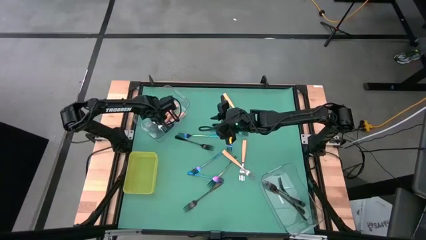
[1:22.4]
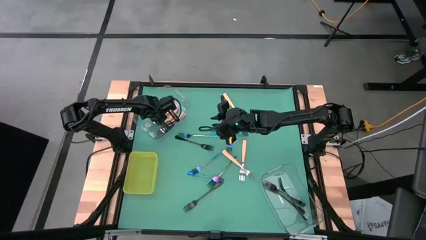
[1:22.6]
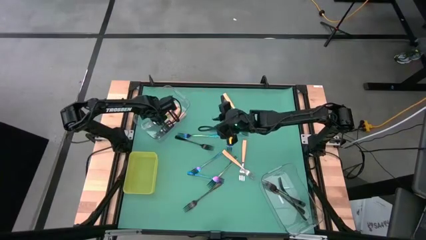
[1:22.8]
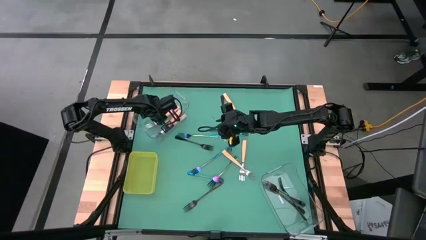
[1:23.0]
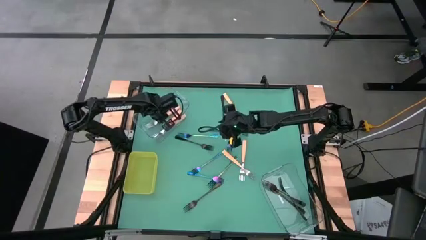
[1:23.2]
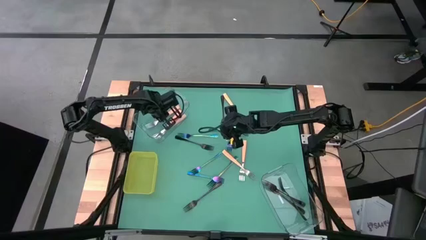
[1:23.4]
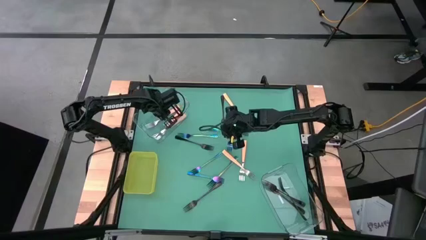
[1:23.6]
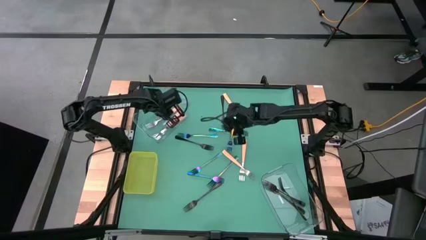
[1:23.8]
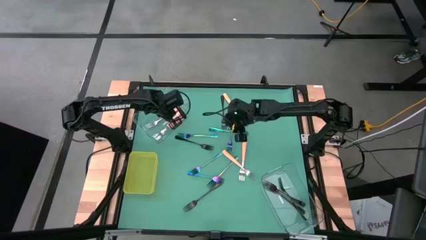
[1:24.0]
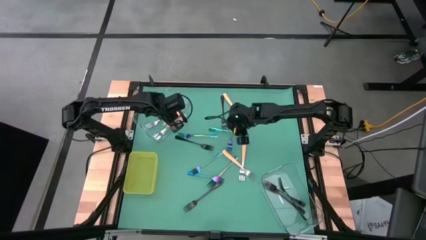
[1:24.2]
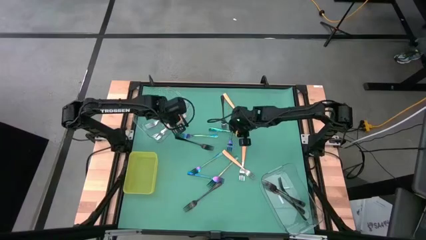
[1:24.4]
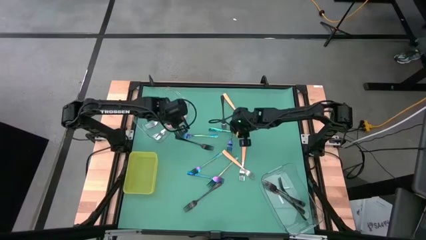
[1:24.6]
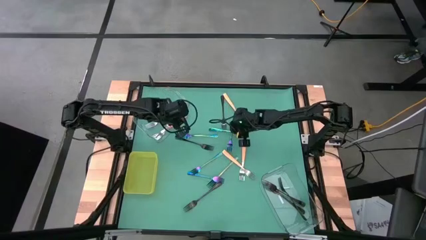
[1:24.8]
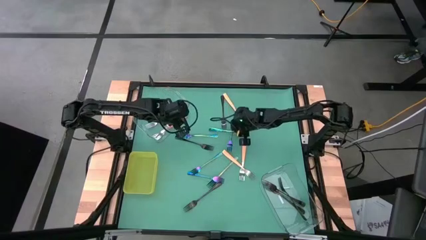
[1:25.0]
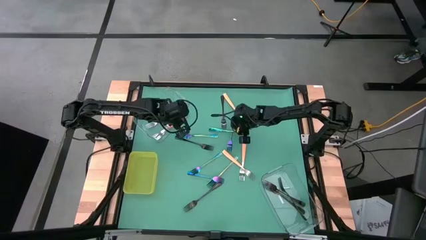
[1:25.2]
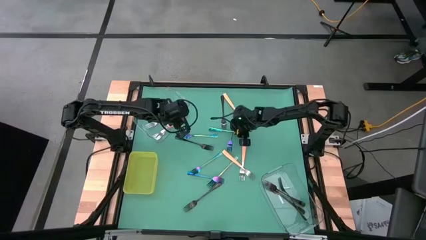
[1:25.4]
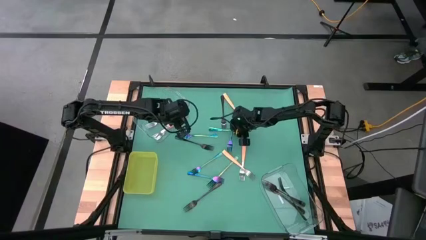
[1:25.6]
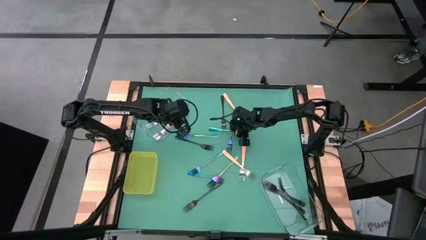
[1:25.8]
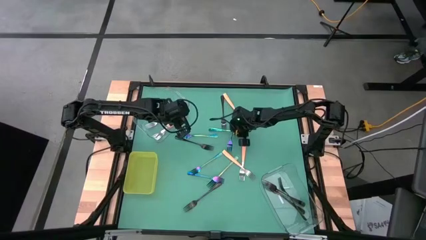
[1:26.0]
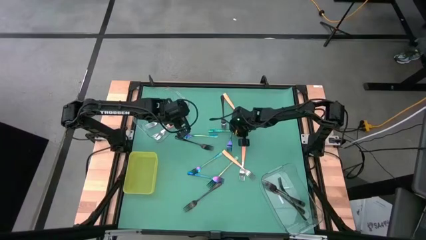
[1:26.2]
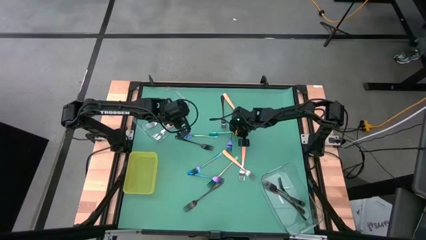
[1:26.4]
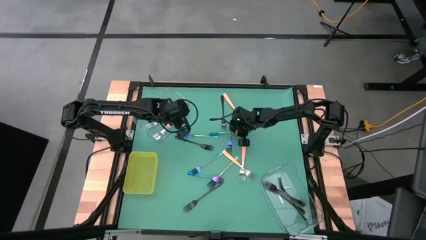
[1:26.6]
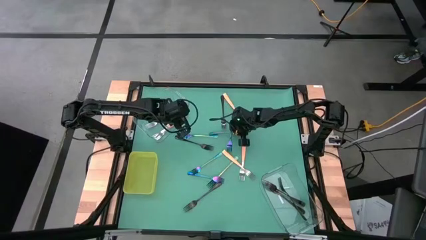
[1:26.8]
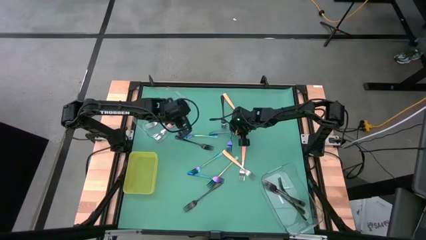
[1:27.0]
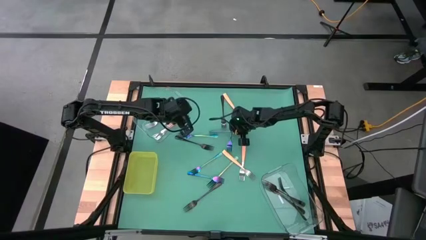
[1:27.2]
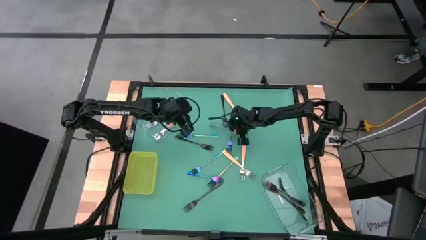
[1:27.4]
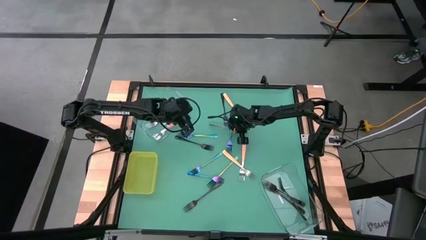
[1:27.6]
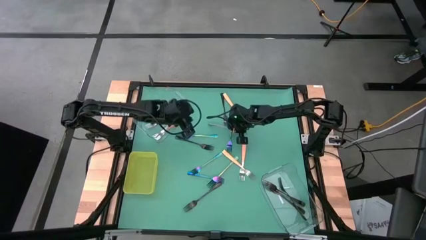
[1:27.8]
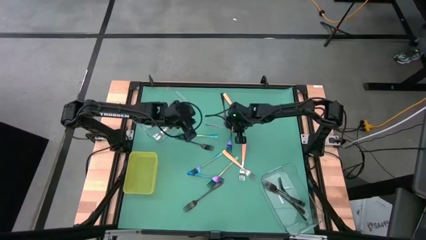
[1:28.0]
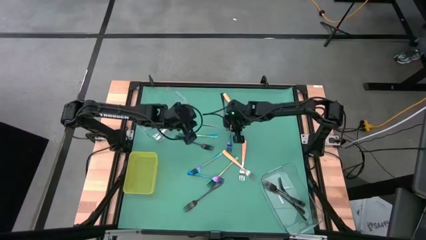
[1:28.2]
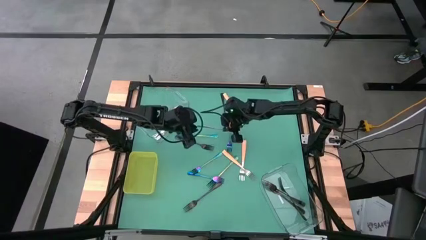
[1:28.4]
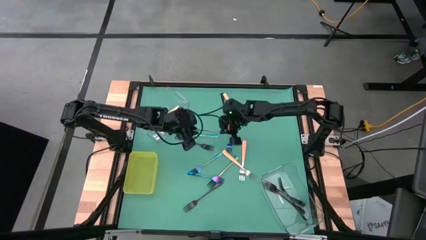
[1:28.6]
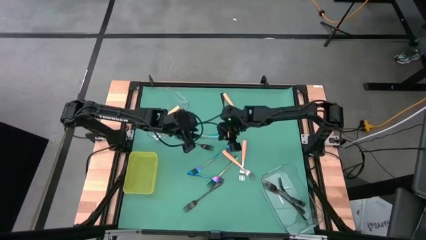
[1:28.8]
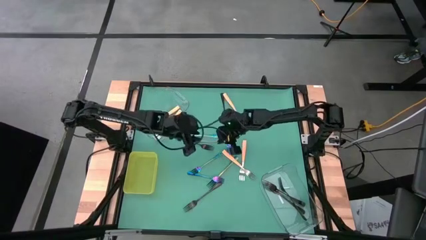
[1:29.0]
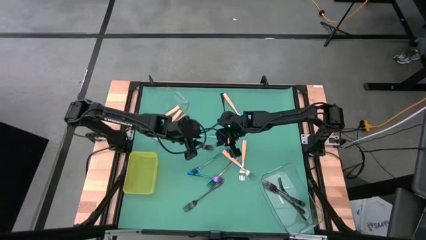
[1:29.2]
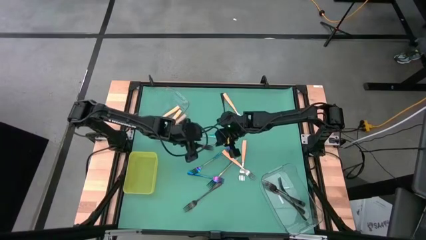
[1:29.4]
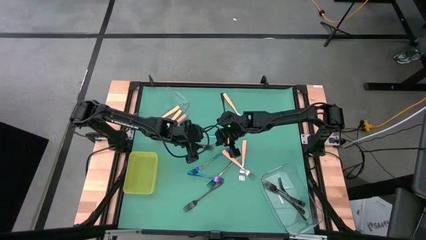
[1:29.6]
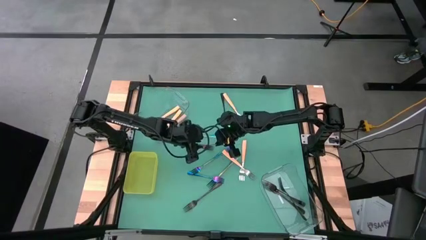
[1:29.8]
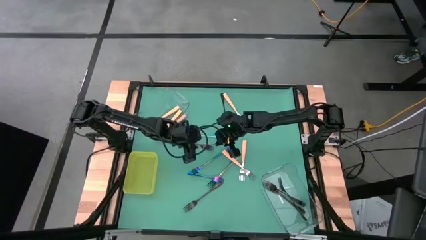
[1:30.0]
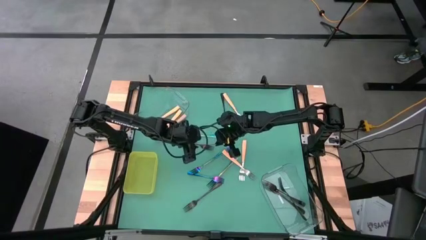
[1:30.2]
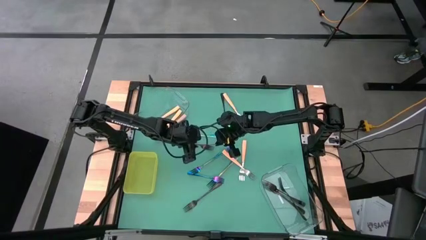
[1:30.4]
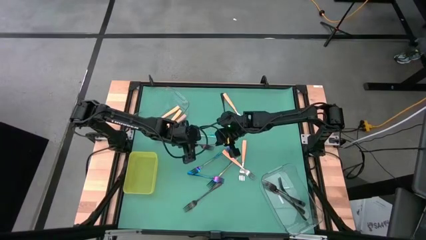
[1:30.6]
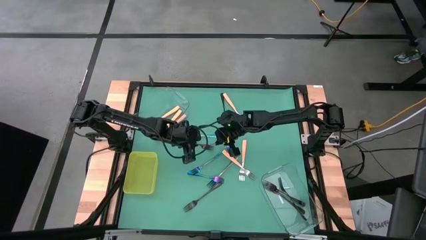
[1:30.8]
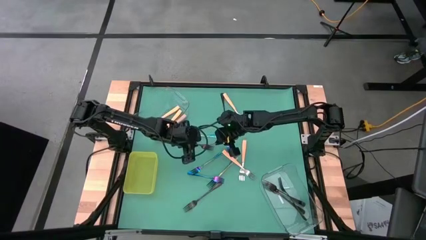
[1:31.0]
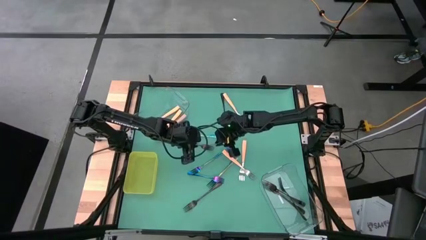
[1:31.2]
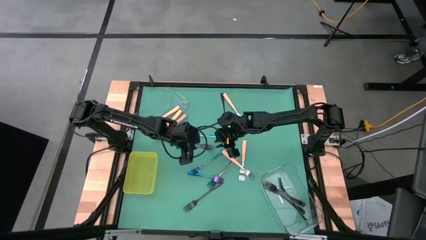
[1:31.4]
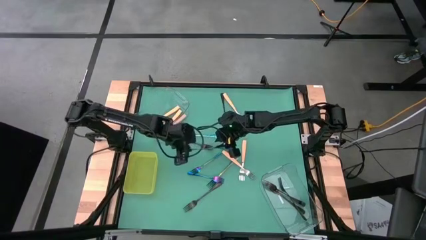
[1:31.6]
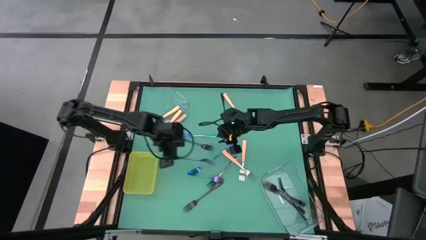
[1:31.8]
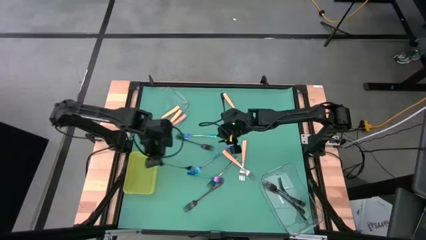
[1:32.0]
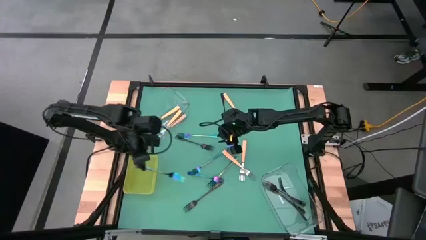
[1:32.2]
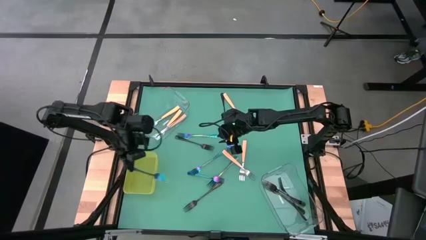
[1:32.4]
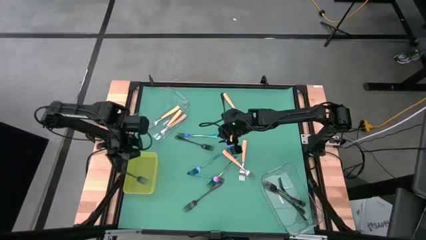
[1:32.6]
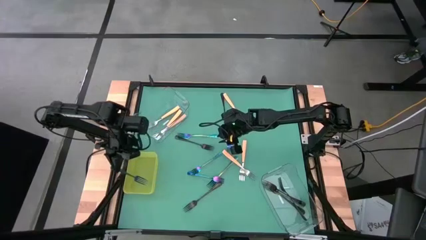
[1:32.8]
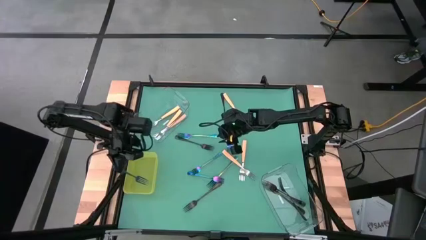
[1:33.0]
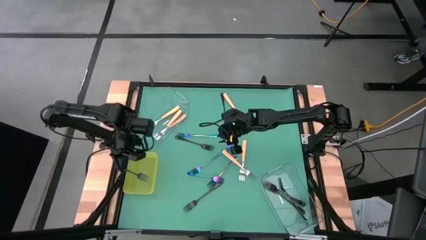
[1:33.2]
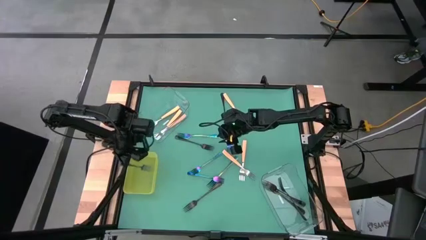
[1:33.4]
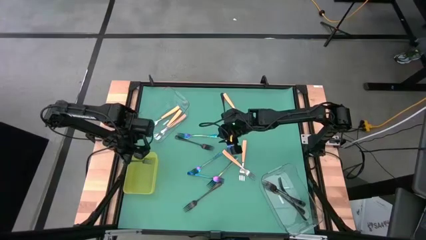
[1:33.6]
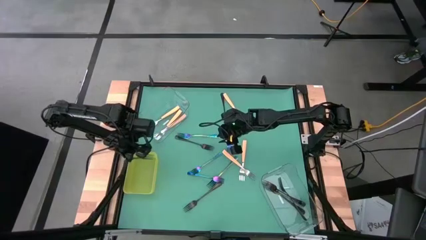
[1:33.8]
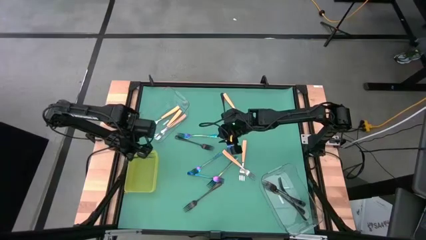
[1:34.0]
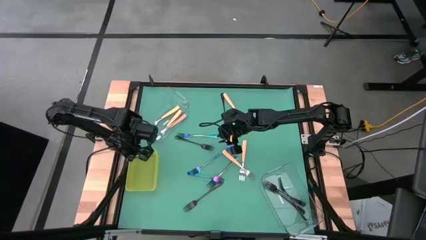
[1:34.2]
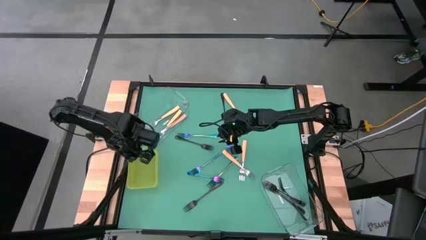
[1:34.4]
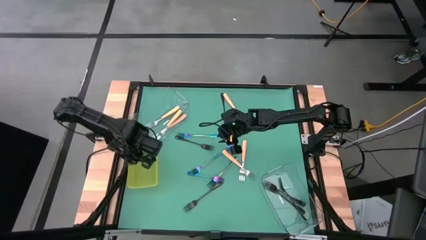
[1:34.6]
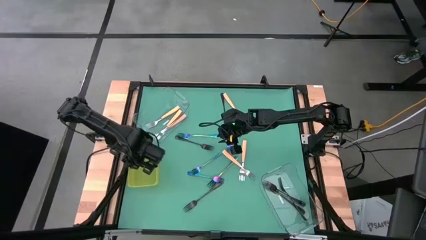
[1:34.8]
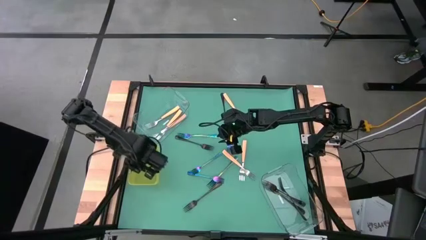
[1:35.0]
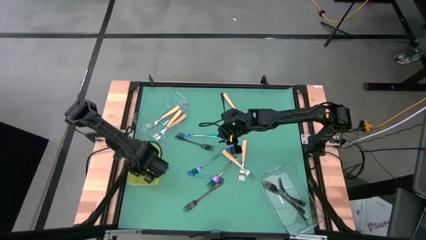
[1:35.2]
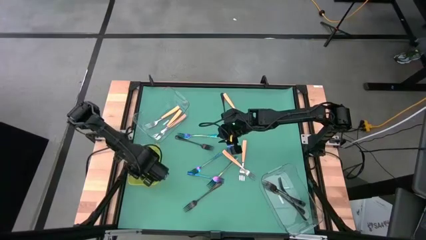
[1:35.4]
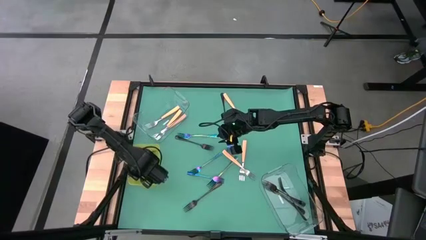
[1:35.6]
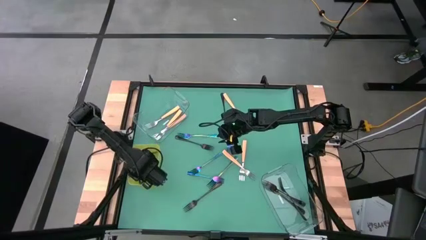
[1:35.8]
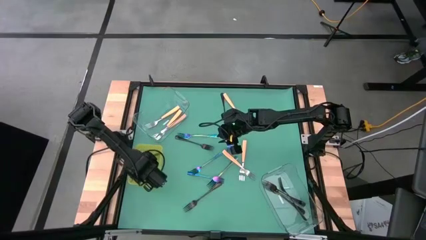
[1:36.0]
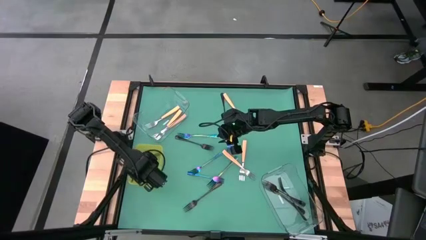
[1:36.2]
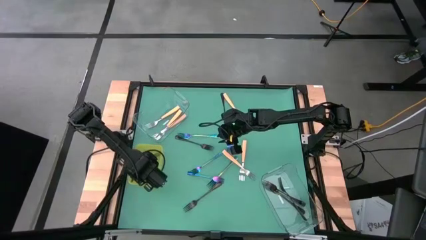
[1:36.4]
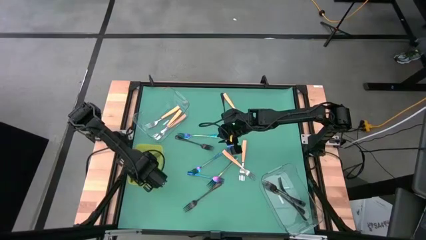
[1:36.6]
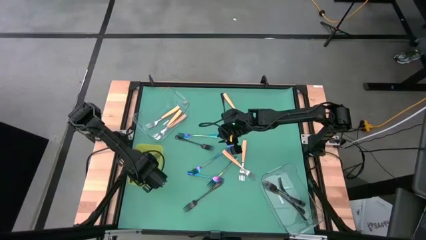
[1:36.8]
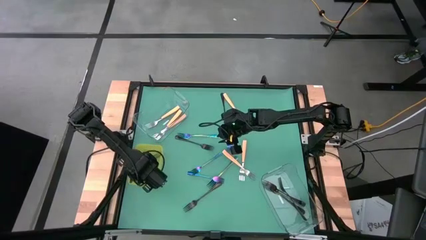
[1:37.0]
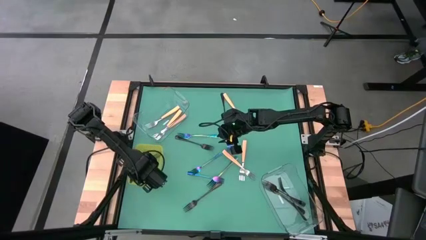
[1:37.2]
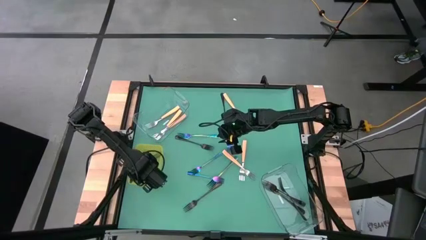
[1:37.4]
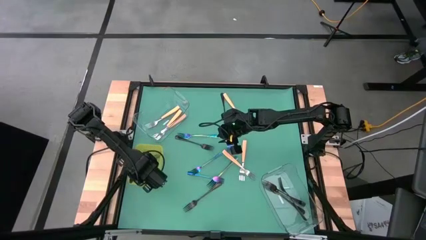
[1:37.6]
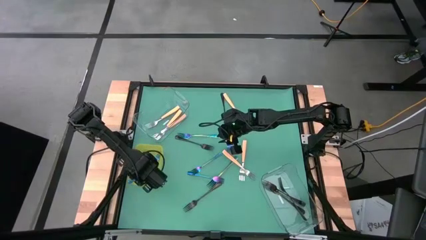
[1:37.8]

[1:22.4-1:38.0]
Task: Sort silverware by color (type)
Put the blue fork in the yellow bin
